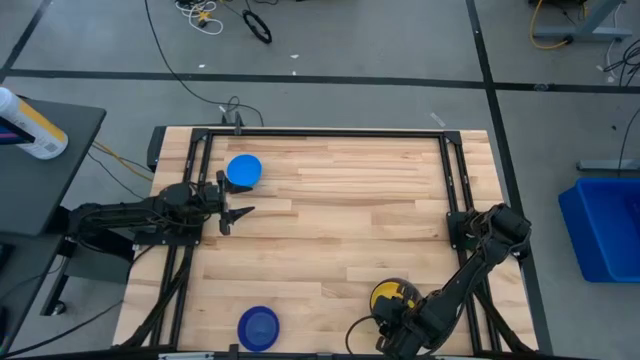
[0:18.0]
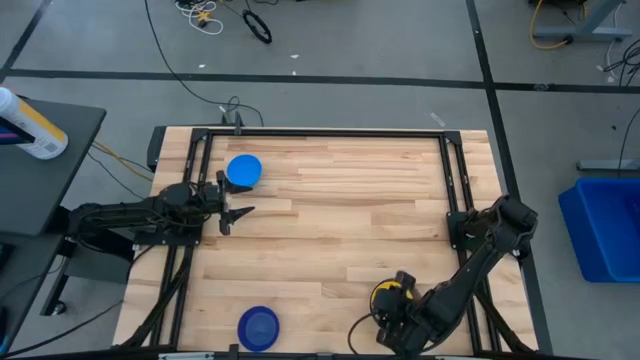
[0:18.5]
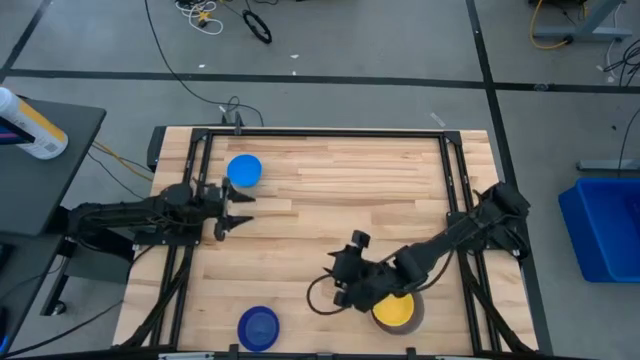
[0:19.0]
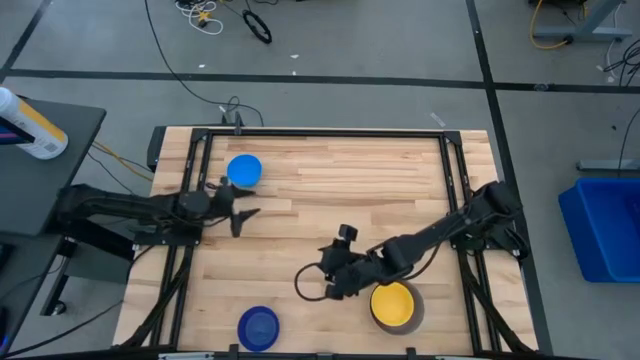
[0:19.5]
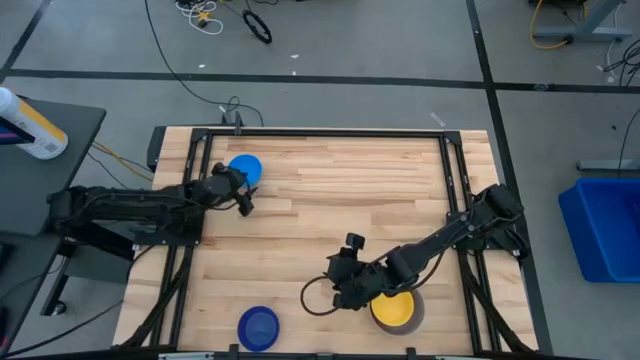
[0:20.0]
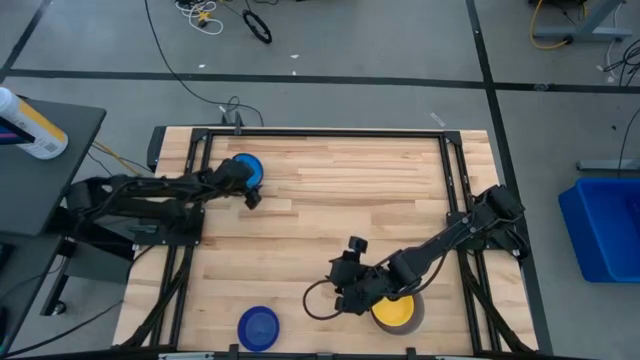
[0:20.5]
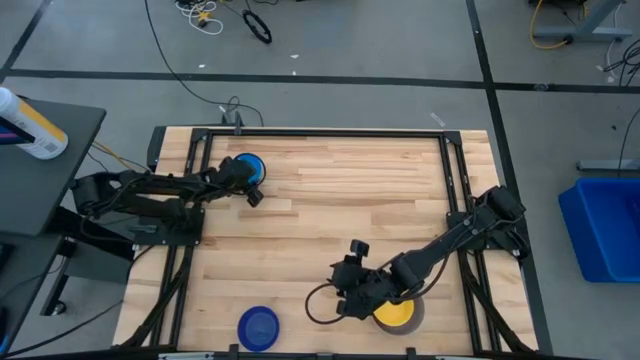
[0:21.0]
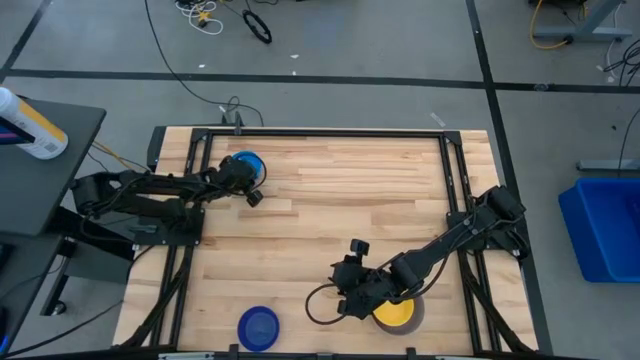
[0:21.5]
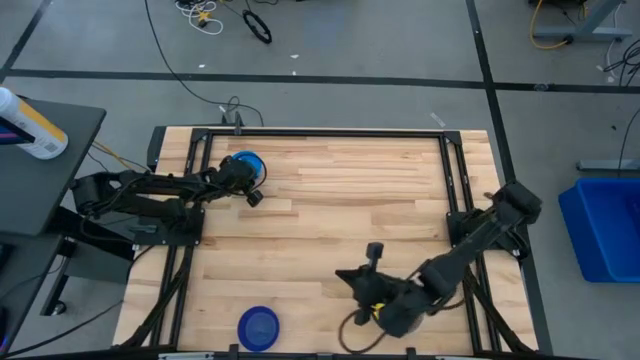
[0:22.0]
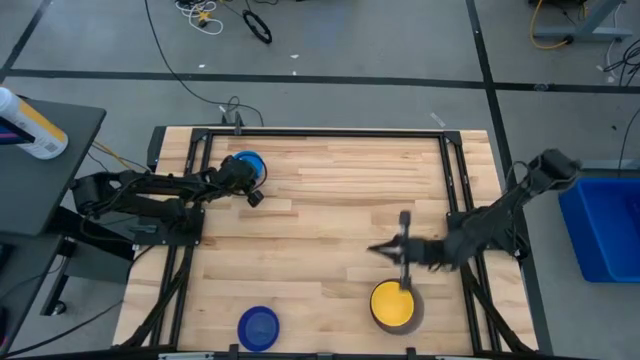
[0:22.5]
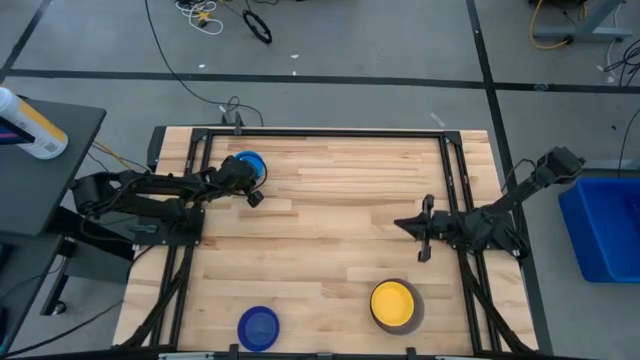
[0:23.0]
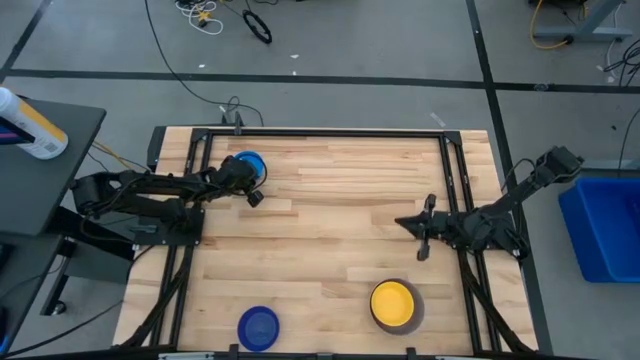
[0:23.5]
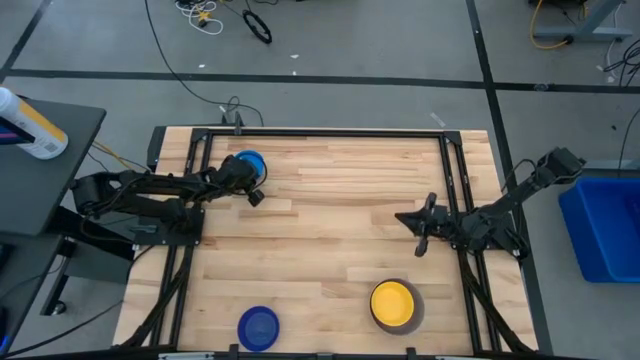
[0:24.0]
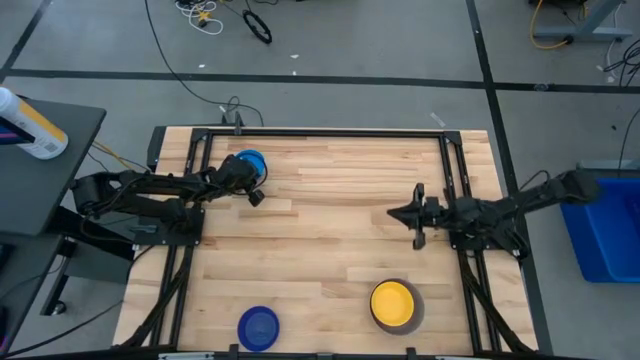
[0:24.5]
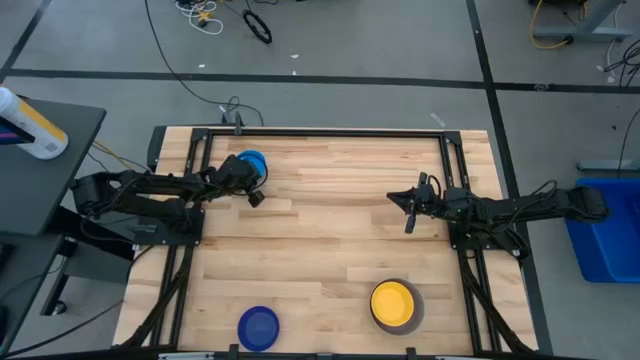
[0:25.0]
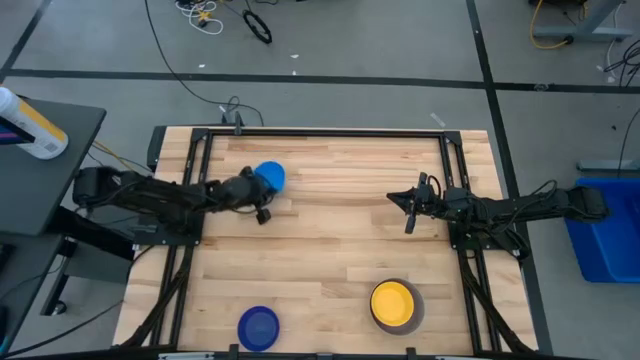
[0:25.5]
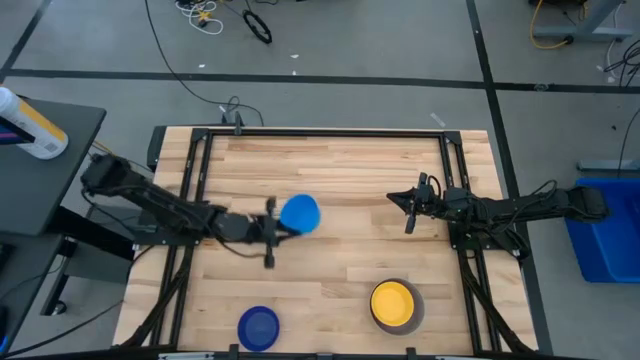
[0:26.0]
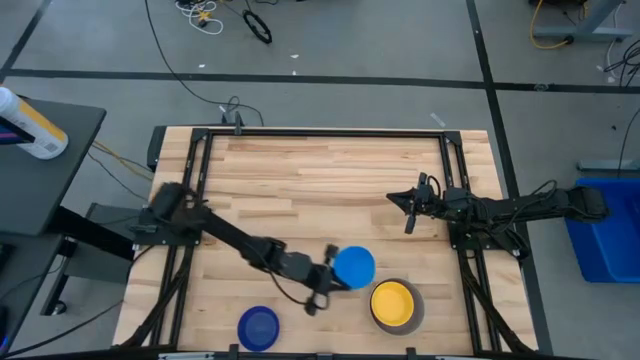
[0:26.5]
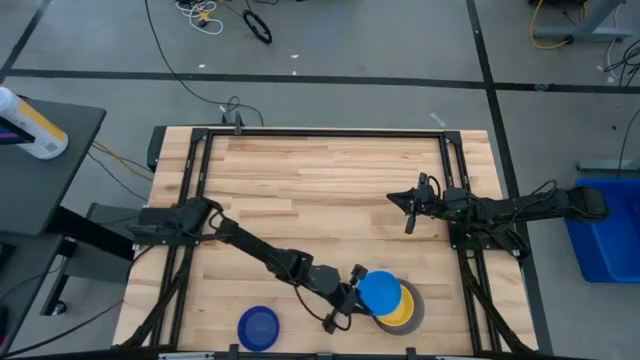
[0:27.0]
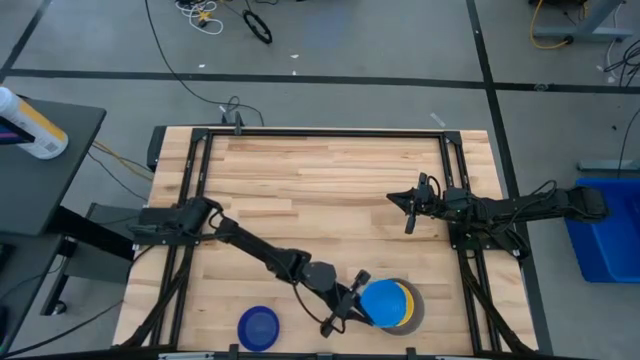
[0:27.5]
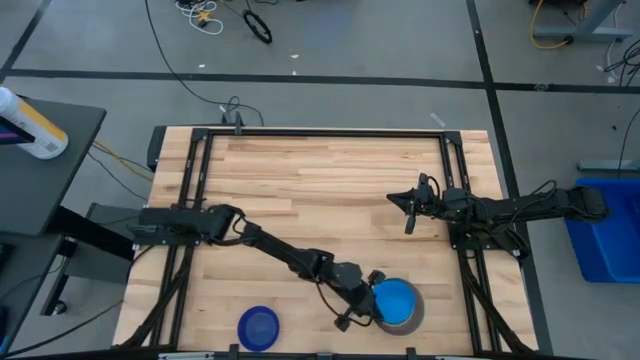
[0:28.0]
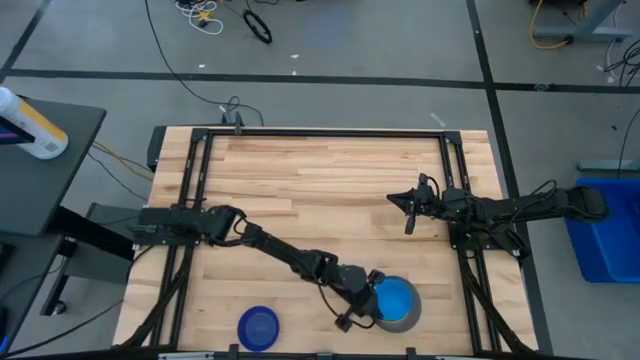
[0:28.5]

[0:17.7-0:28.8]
Stack the blue bowl on the yellow bowl

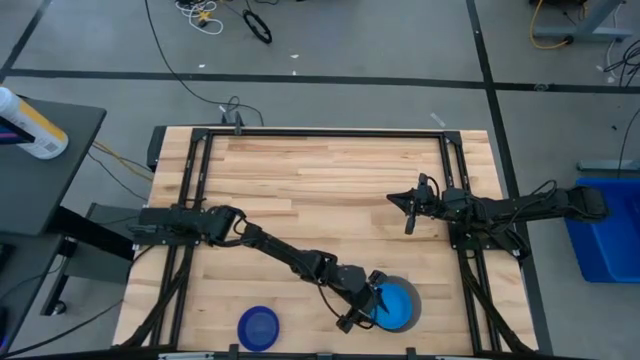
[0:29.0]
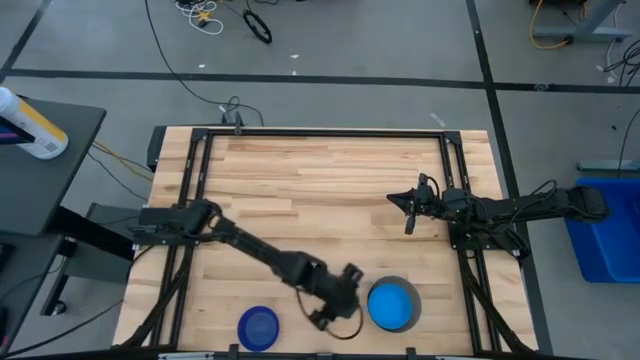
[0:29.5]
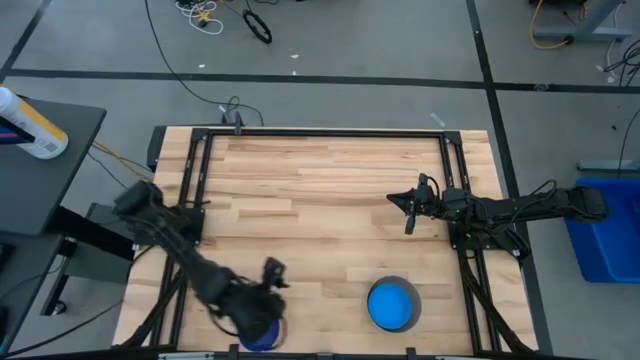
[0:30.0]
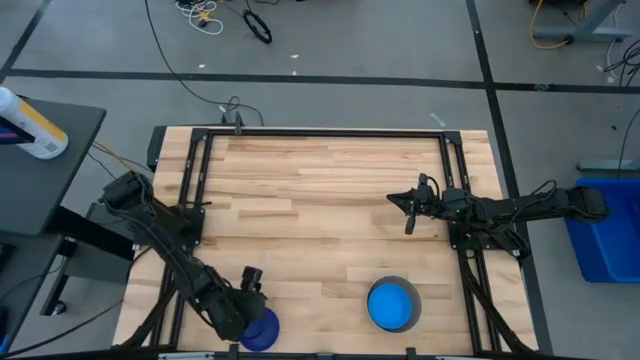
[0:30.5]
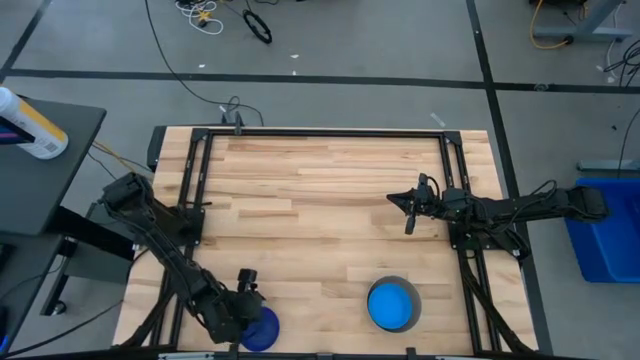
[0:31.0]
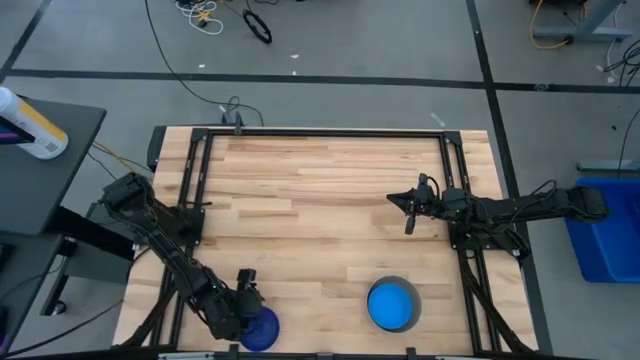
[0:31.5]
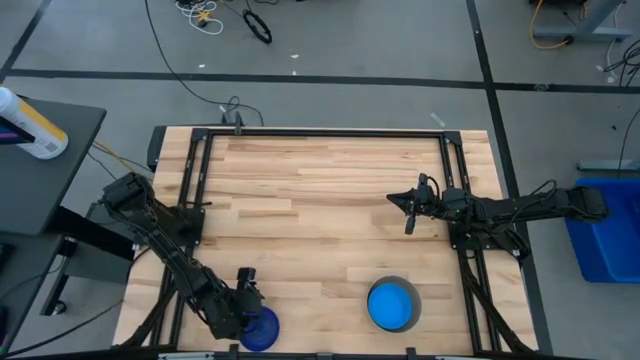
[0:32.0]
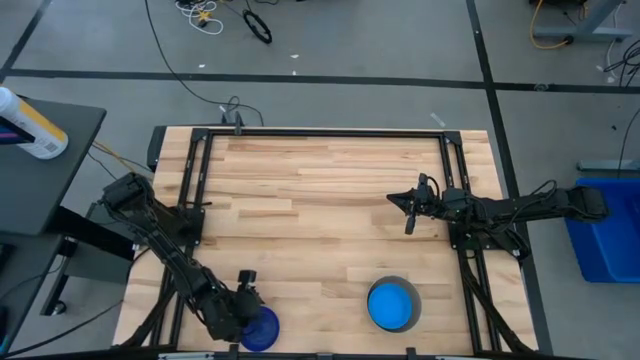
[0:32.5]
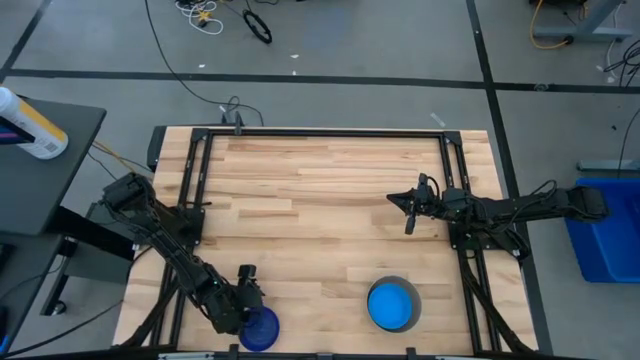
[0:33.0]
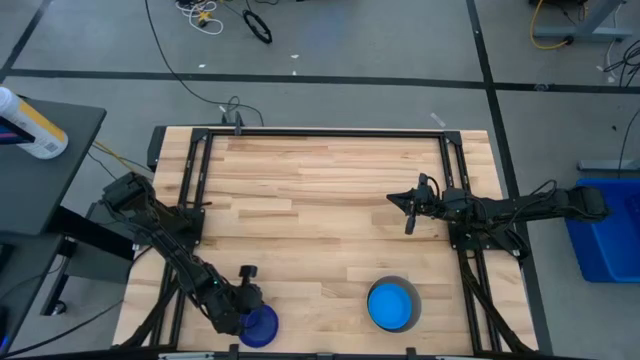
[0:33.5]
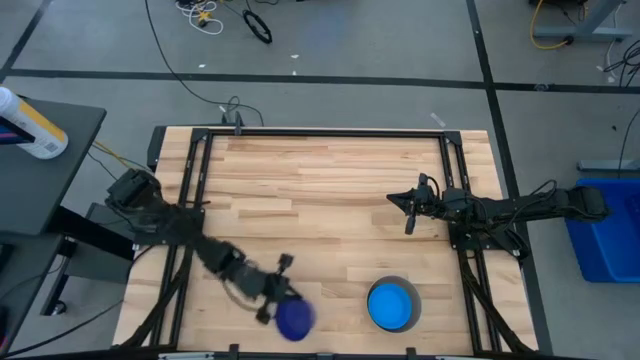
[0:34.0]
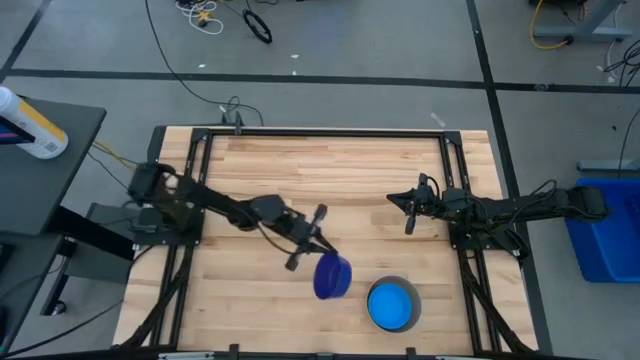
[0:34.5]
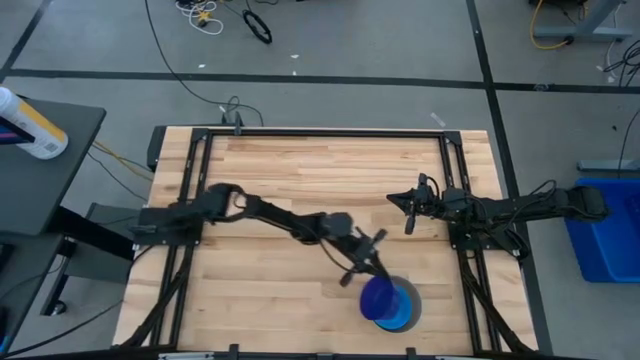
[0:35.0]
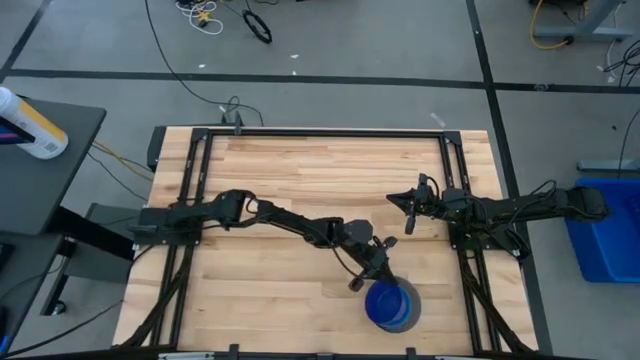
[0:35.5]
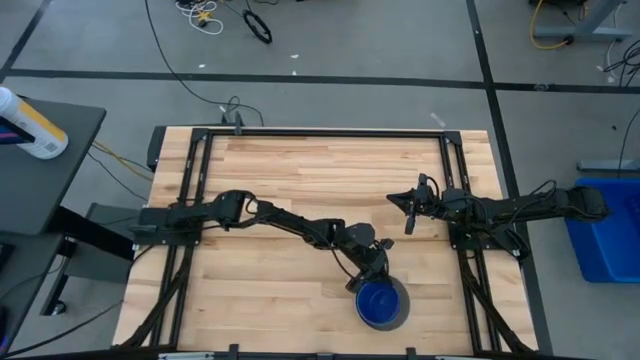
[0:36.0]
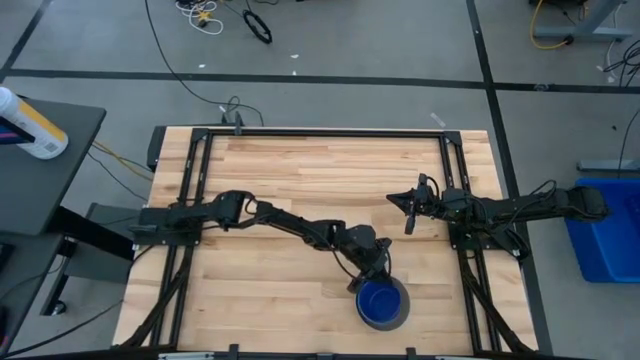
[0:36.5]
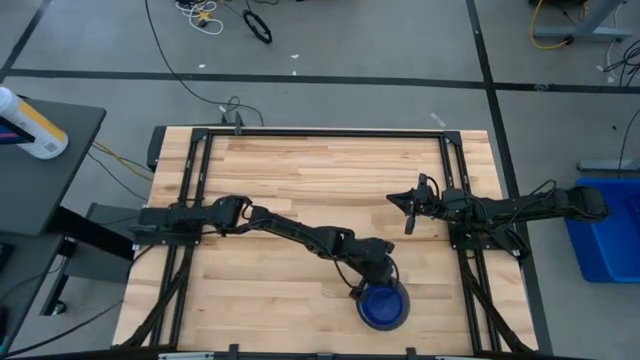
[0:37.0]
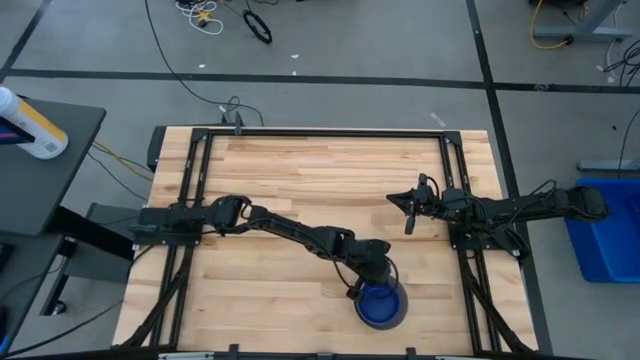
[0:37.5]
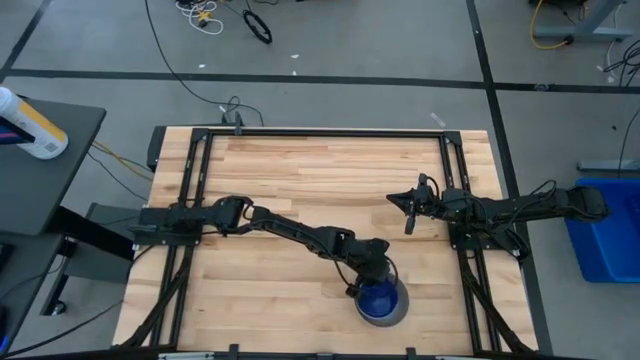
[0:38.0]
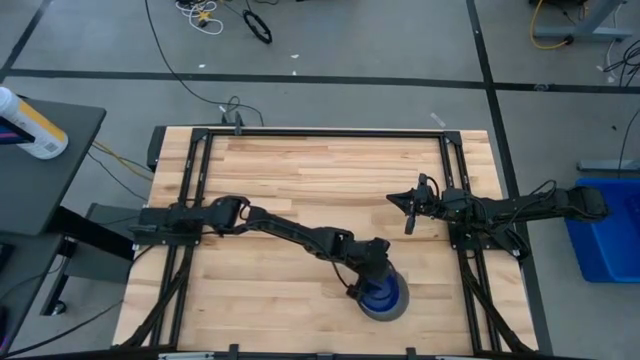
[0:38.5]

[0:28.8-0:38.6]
Stack the dark blue bowl on the blue bowl
